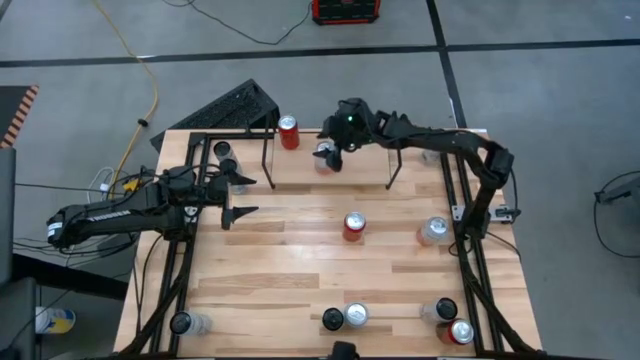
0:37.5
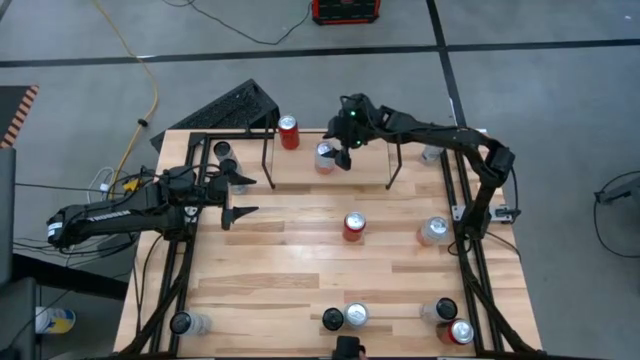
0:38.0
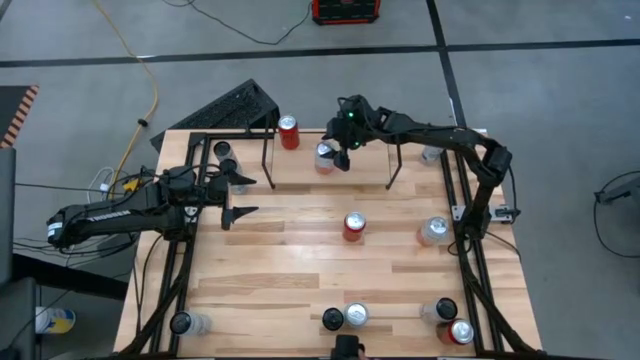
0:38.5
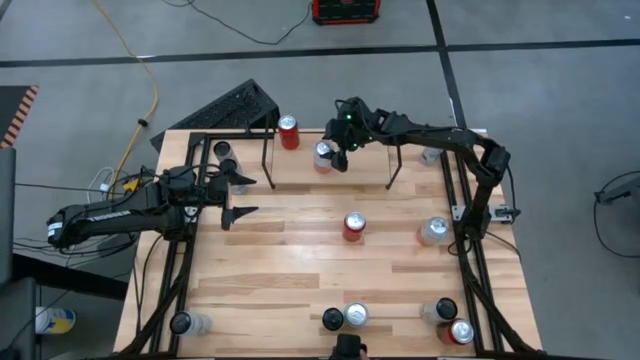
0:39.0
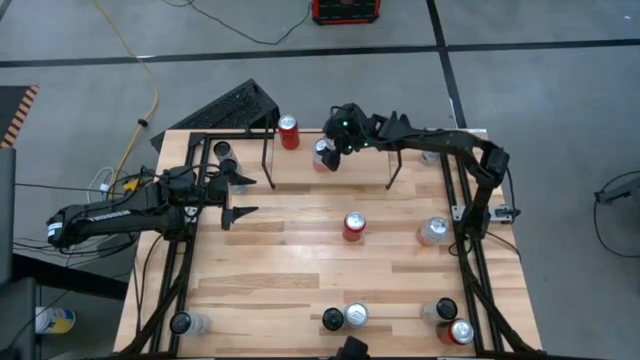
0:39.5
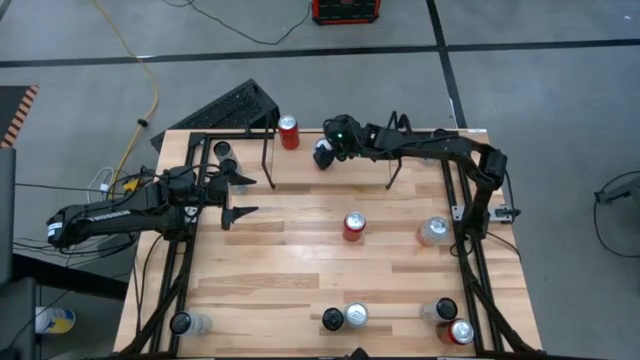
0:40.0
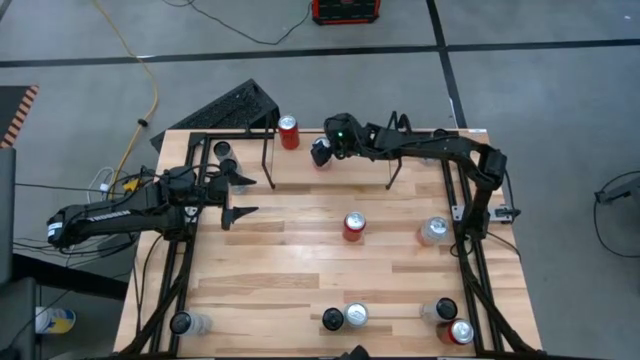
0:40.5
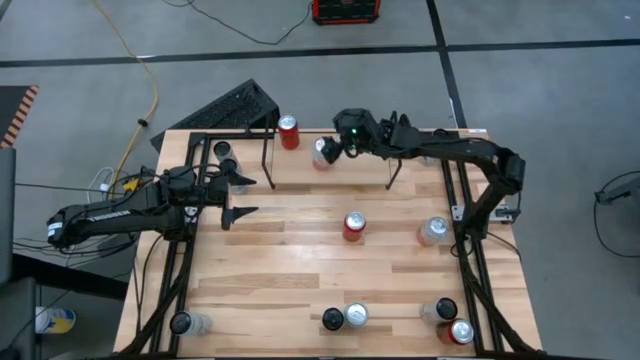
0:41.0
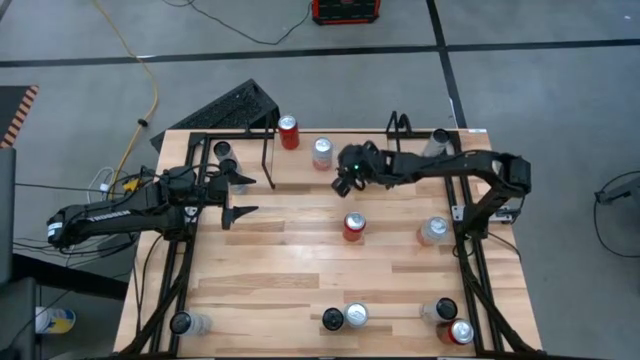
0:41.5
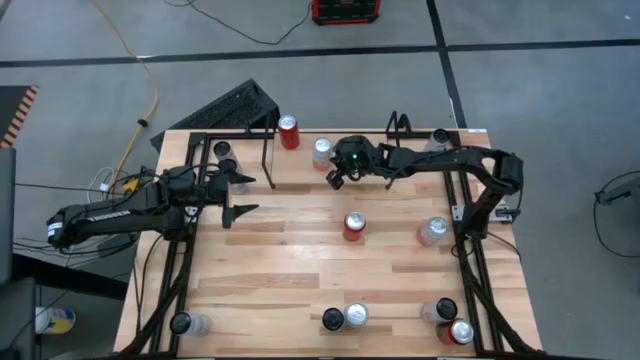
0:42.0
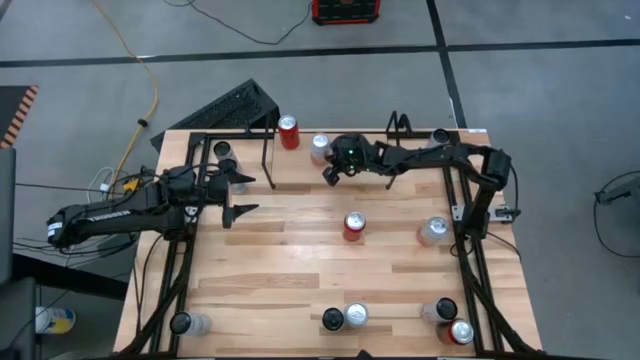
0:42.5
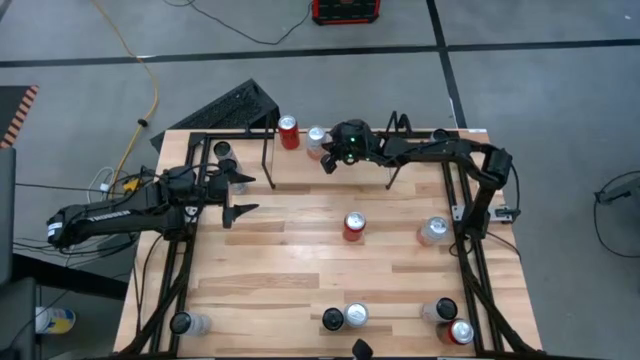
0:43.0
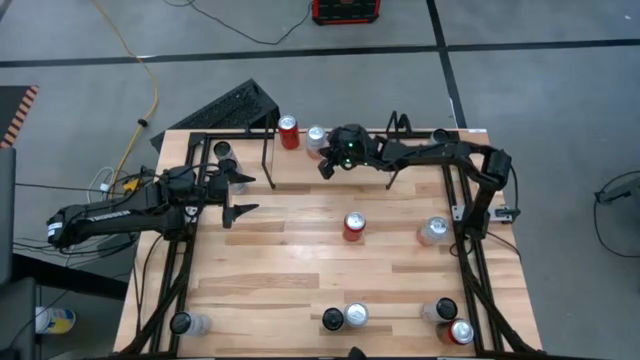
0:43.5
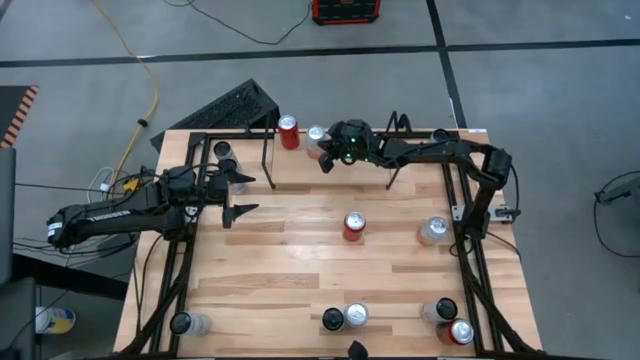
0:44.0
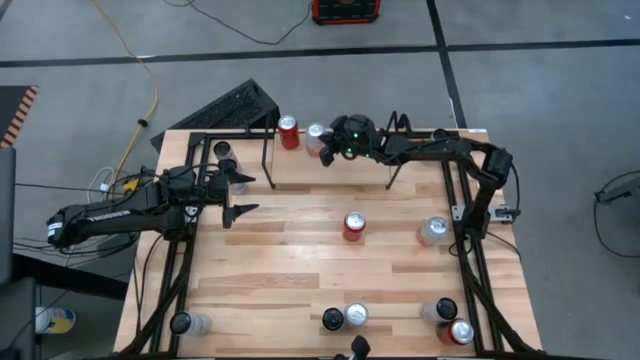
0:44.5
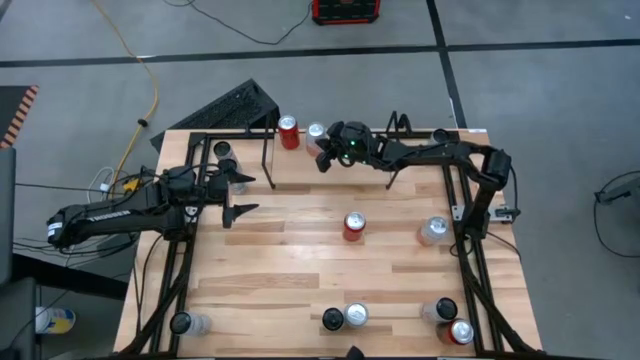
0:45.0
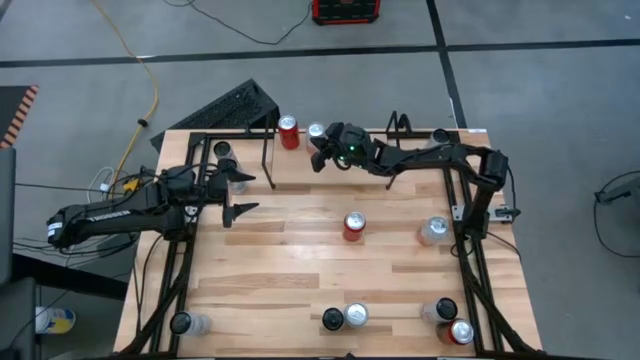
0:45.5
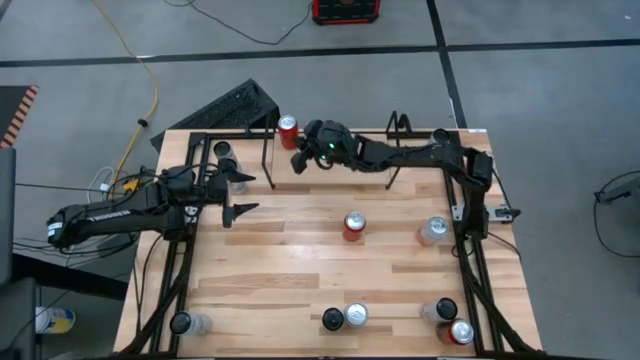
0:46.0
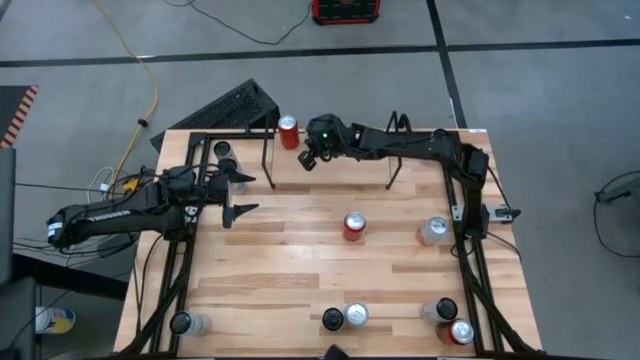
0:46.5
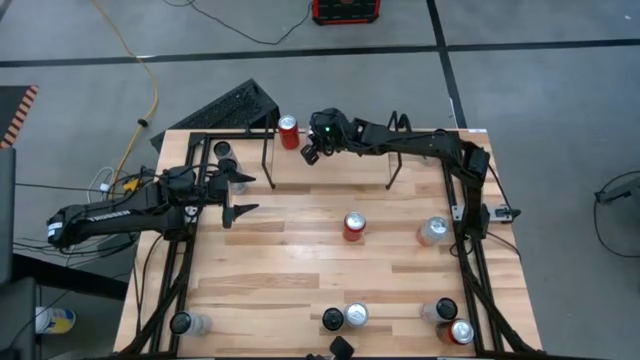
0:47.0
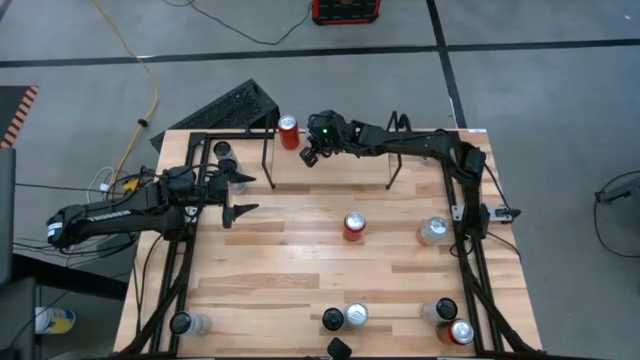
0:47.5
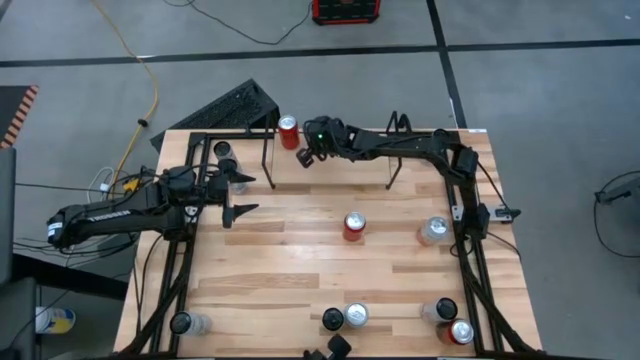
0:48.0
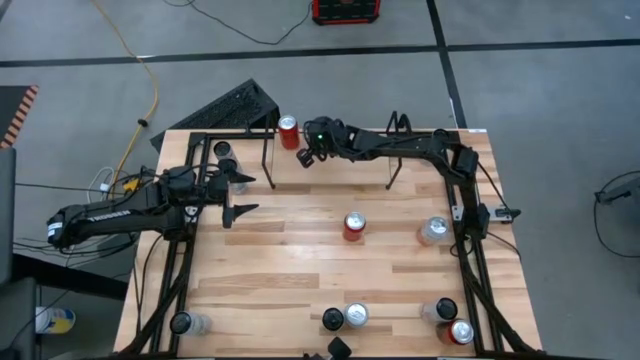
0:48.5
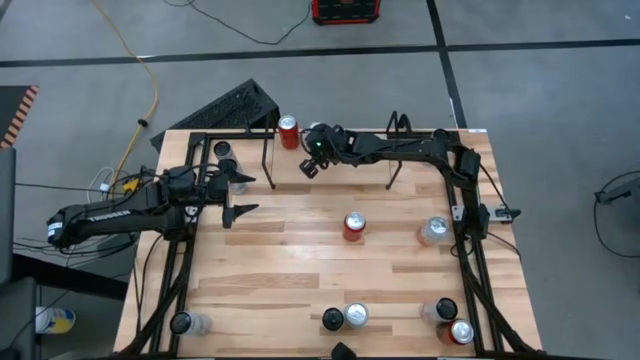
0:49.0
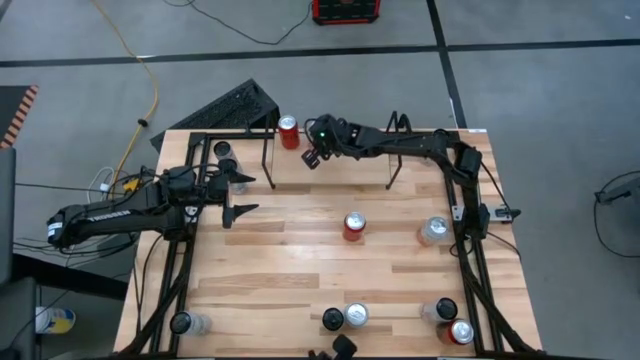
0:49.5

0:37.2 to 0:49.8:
Task: Place canned beverage on shelf
Put the top left pink white soda can on the shelf

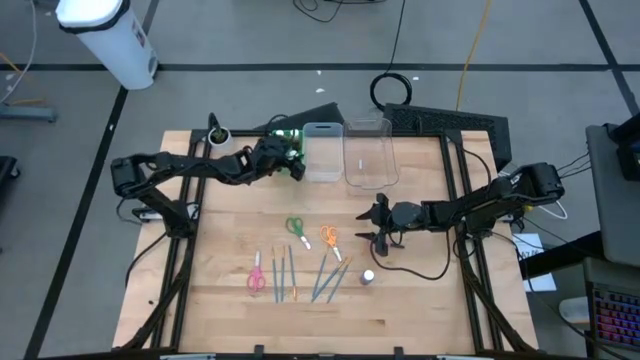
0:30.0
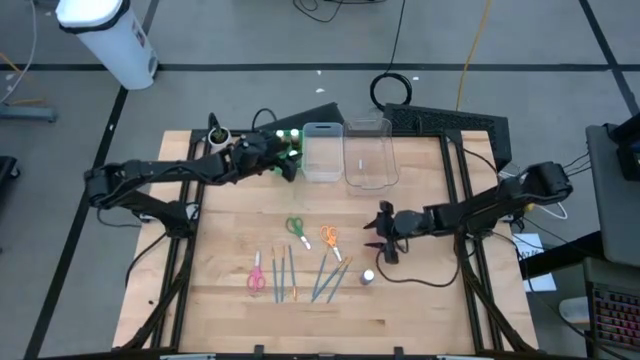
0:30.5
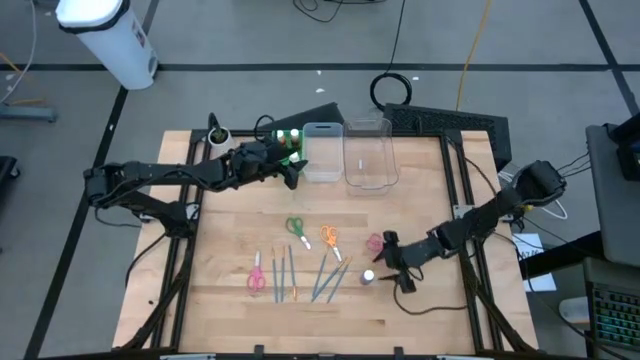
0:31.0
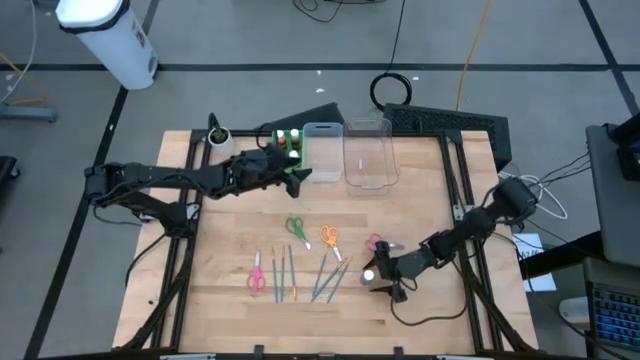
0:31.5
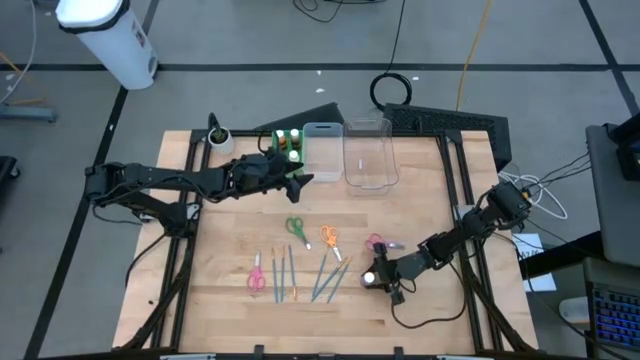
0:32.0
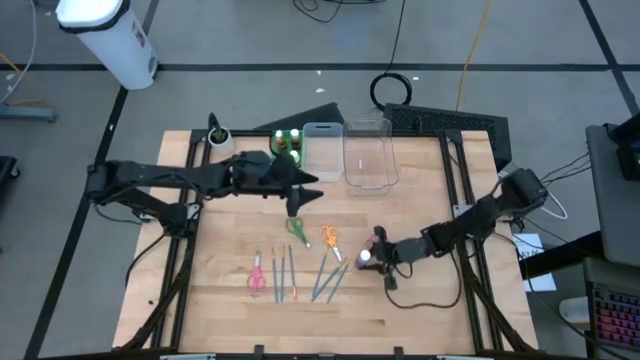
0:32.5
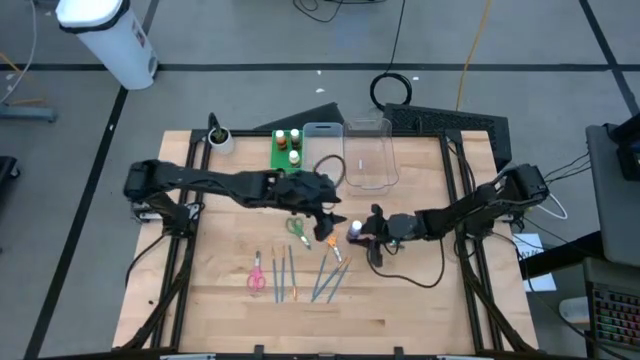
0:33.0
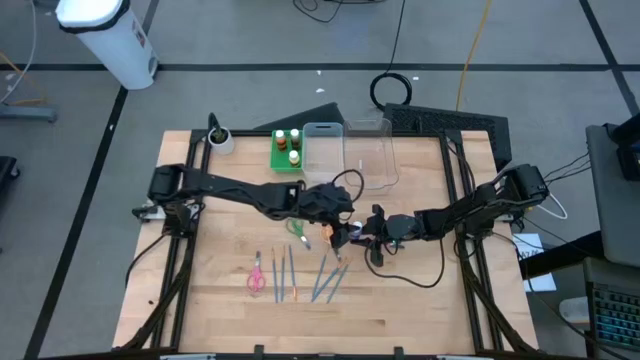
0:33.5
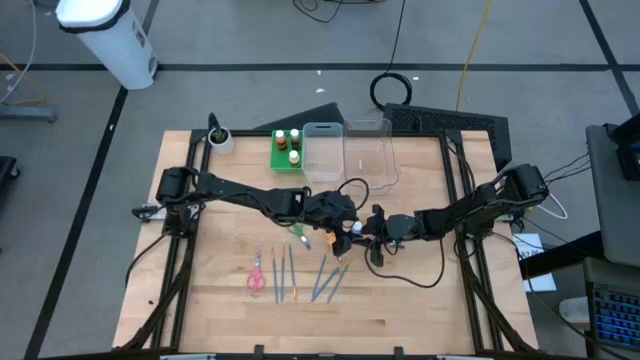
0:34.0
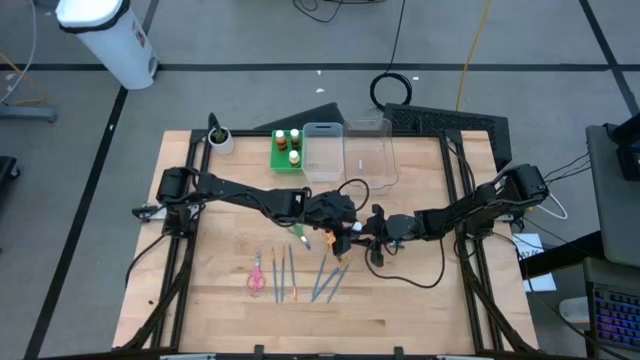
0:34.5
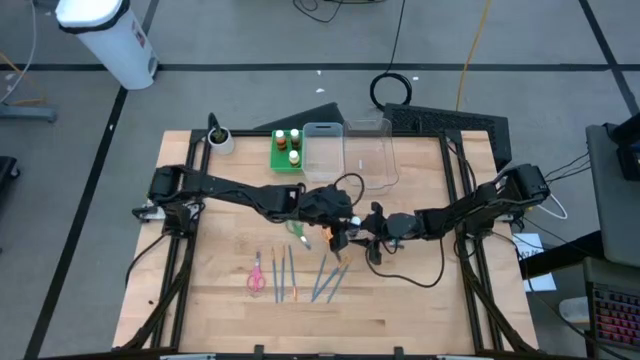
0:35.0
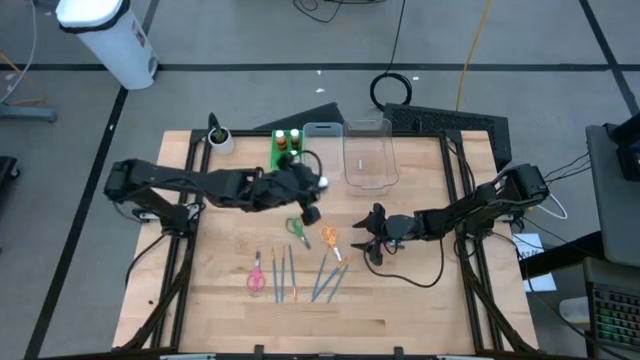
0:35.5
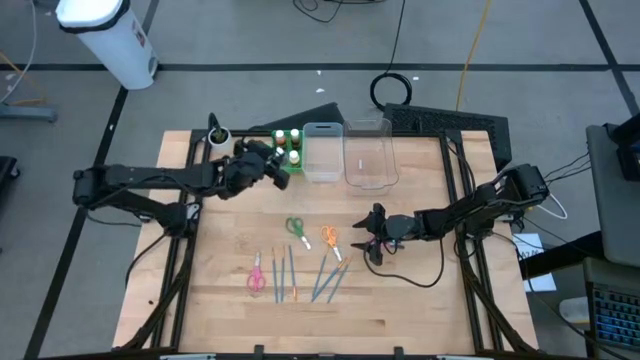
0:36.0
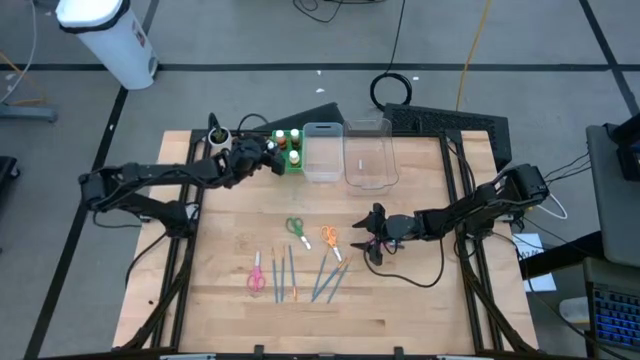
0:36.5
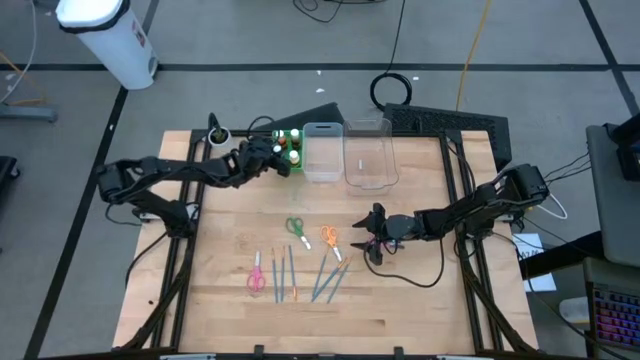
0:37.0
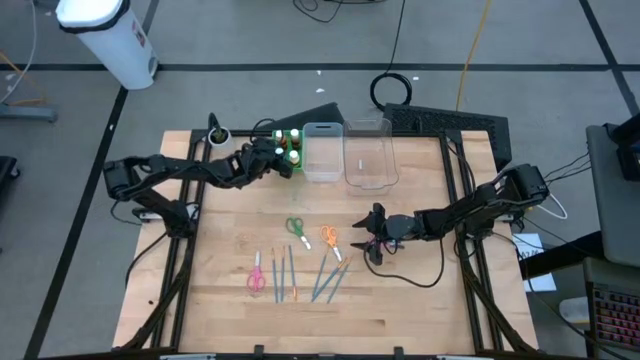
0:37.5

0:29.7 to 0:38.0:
Task: Pick & Place Paint Supplies
Put the purple paint bottle into the green bin

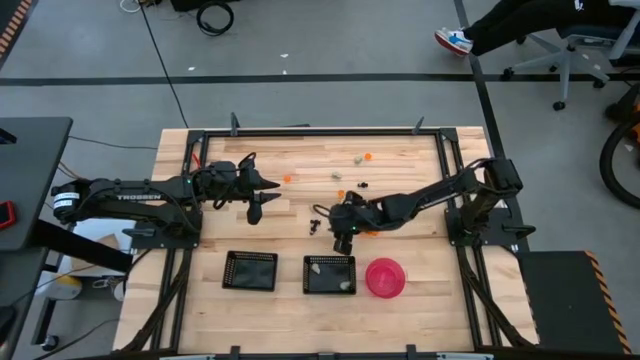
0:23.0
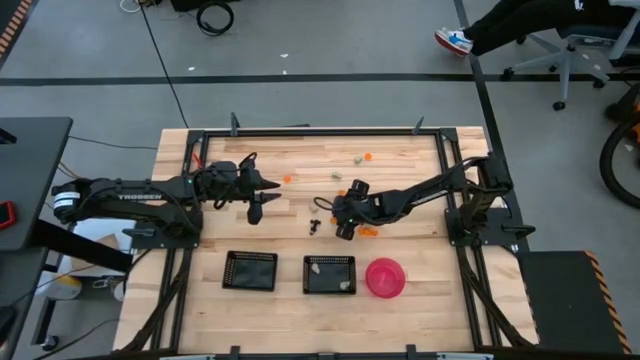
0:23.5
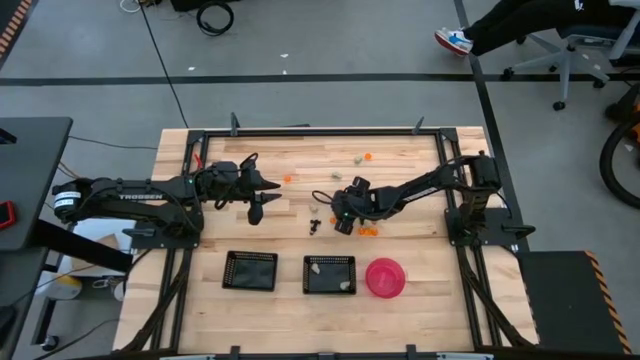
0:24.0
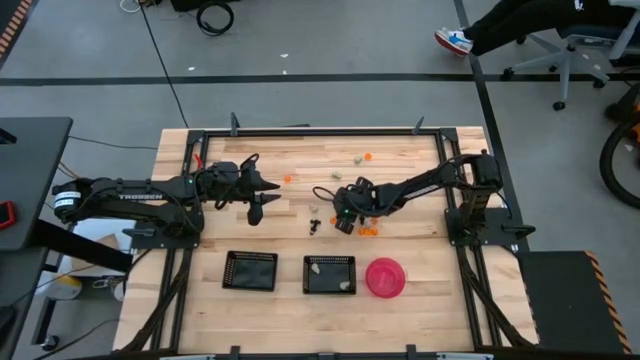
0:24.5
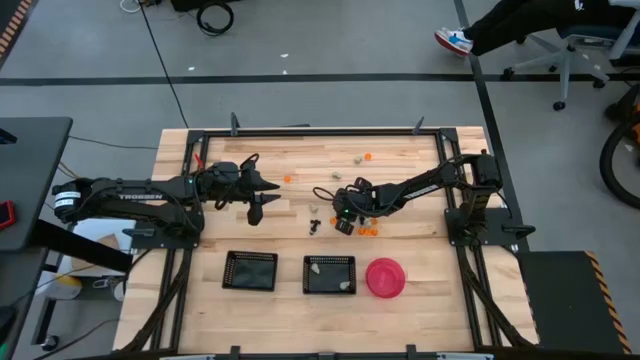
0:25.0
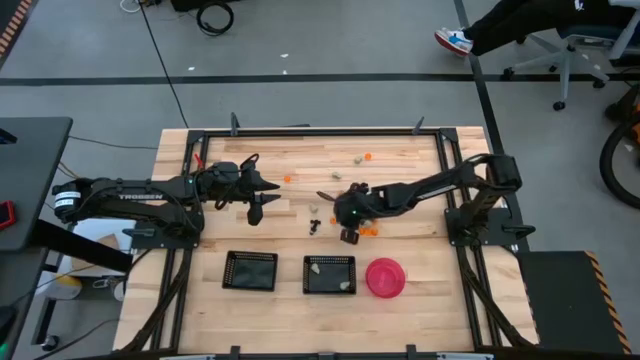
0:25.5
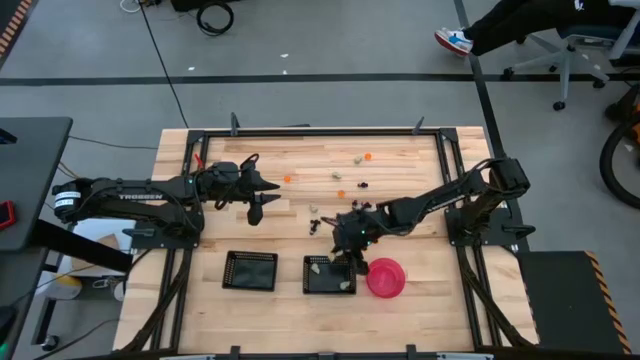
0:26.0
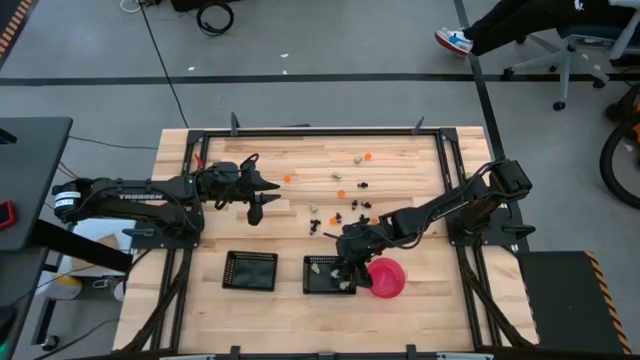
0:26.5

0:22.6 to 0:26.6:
Task: Sort Halloween decoration
Put the white skull toy into the right black bin
